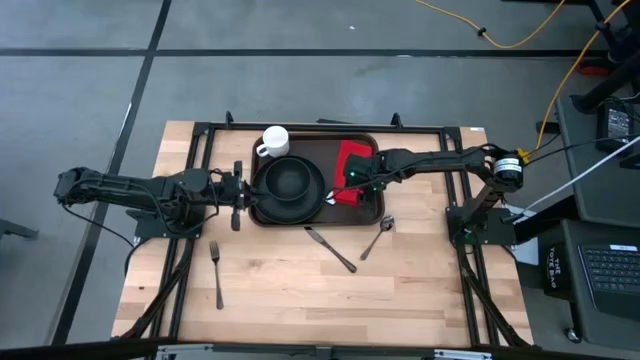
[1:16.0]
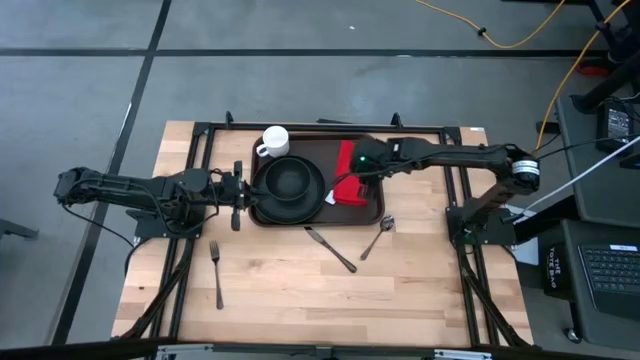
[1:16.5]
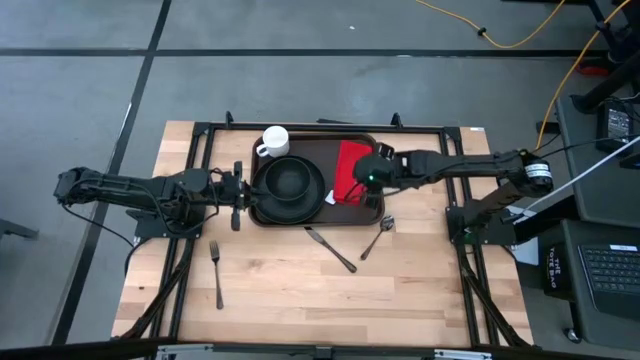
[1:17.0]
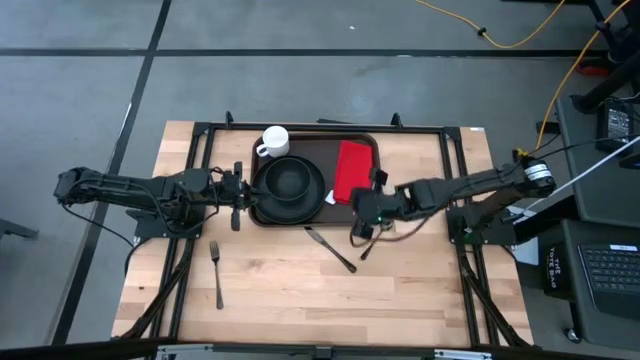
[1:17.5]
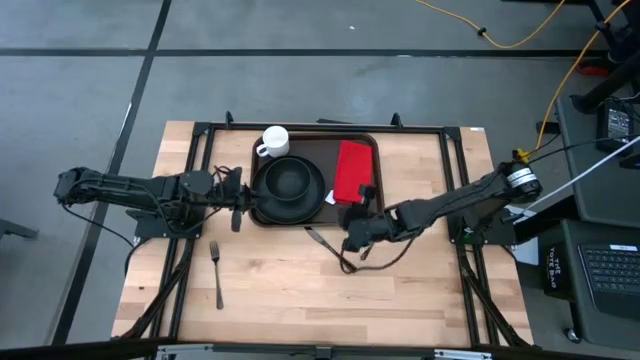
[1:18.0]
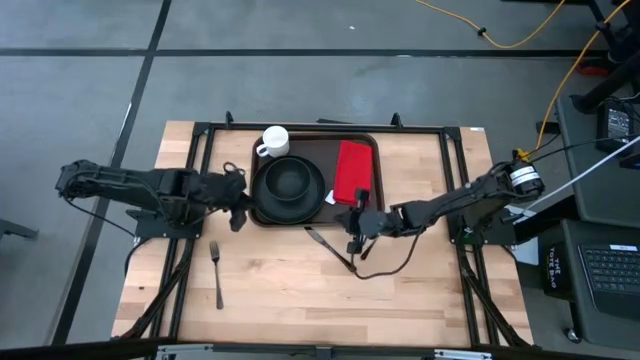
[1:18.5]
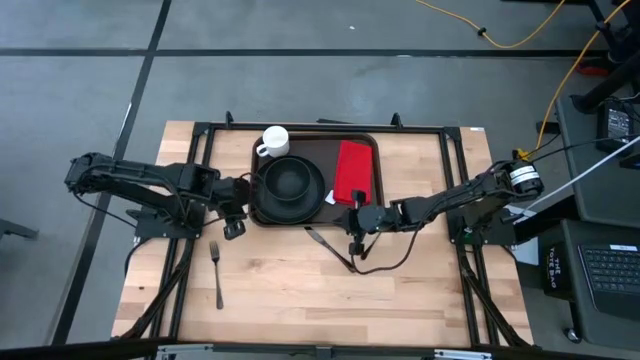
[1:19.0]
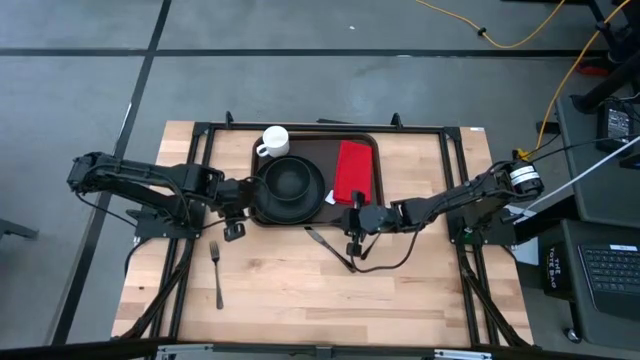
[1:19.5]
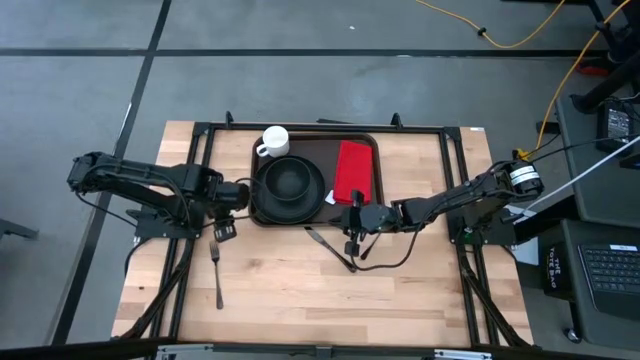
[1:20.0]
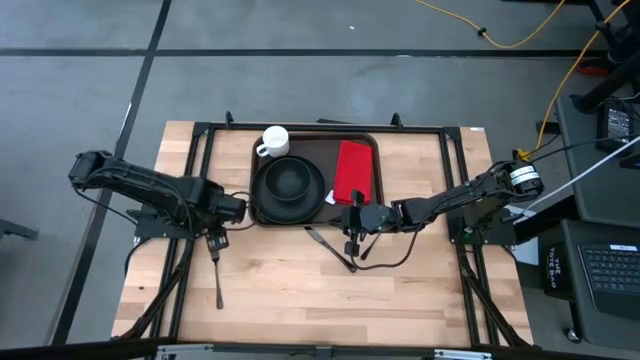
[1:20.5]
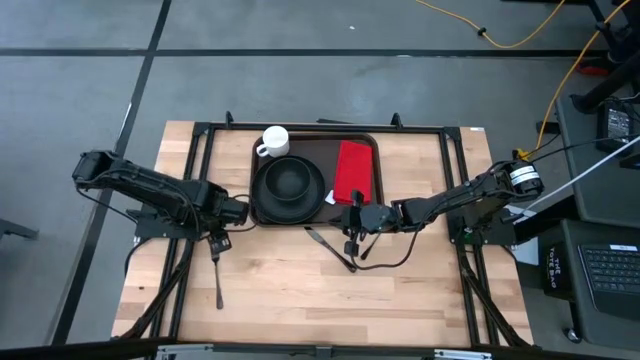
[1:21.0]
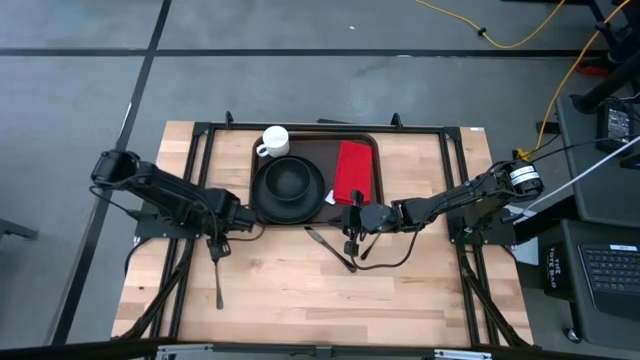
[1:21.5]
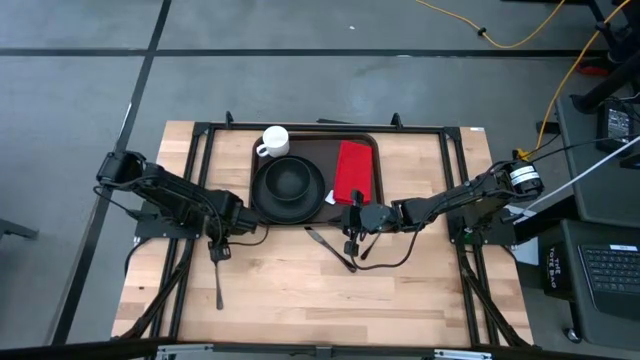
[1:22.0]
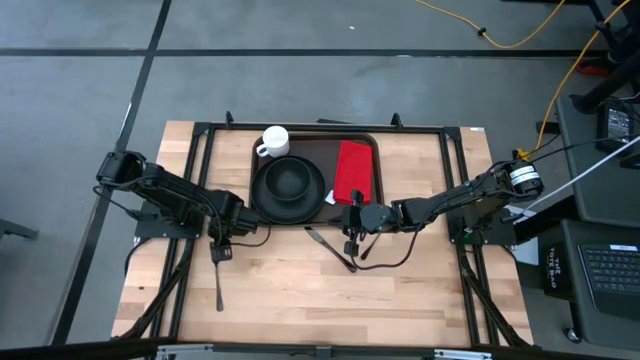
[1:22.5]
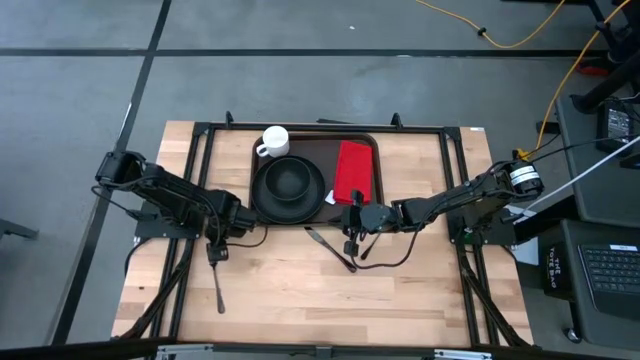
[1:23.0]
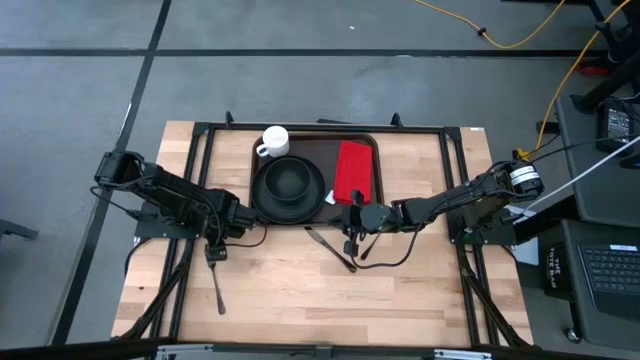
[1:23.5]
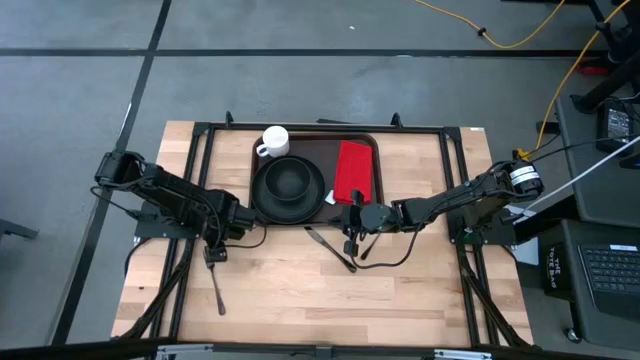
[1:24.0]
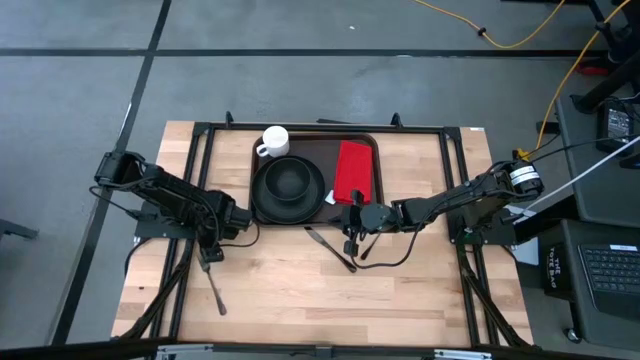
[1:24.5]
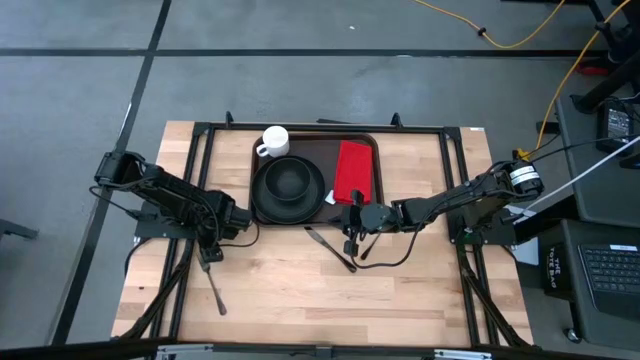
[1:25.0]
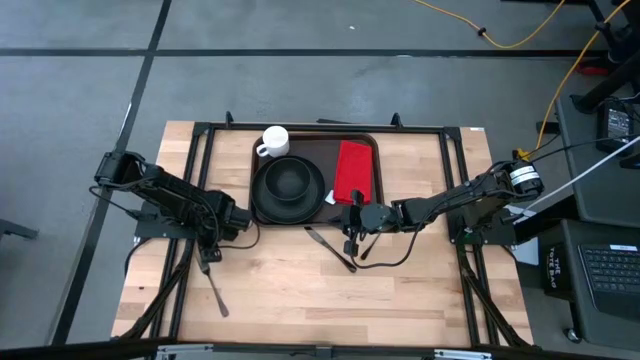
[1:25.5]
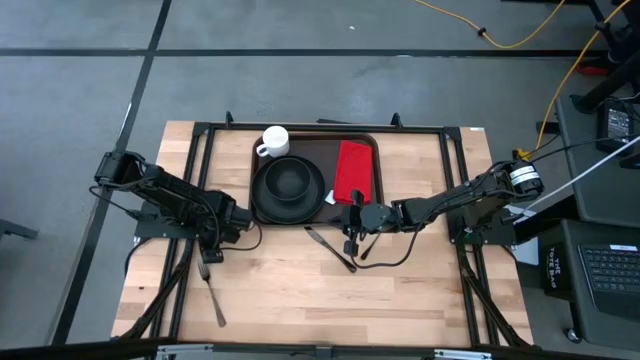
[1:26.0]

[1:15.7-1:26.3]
Task: Set up tray
Put the black fork on top of the red table napkin on the brown serving tray

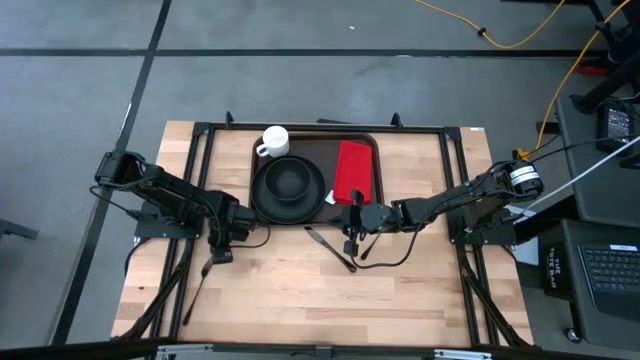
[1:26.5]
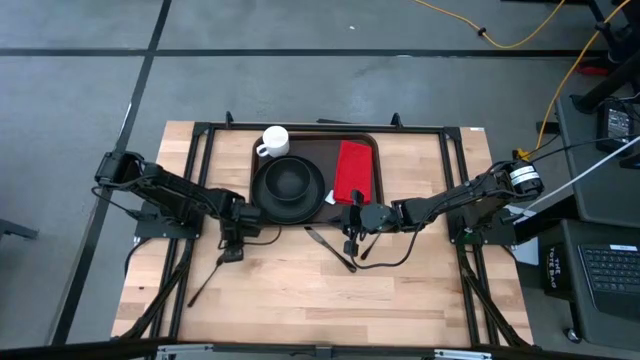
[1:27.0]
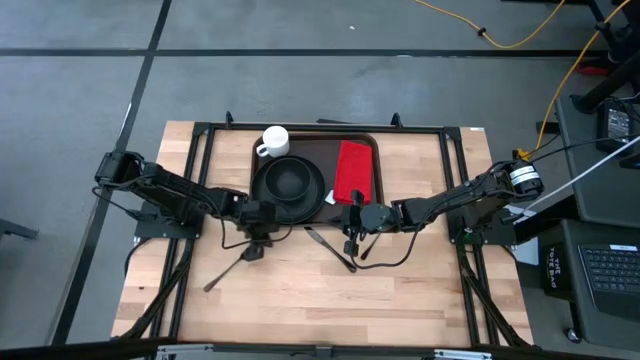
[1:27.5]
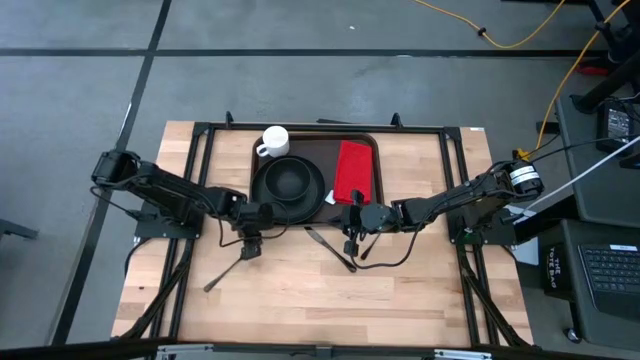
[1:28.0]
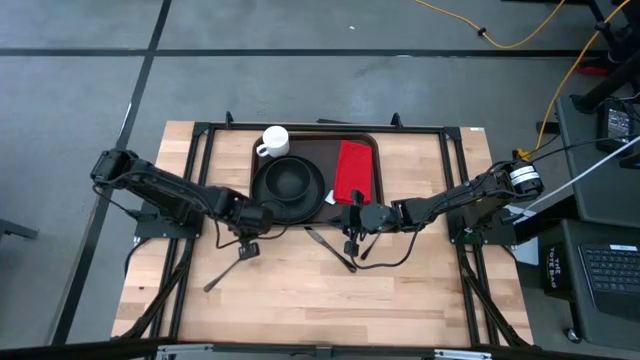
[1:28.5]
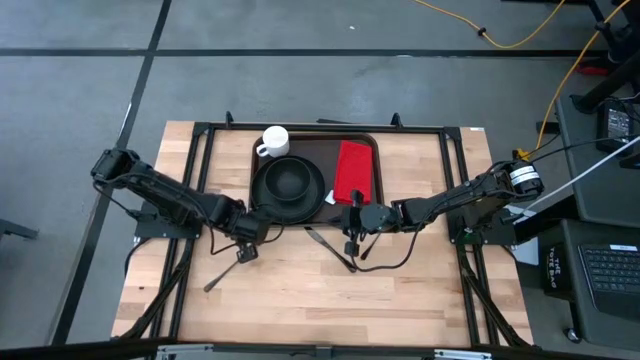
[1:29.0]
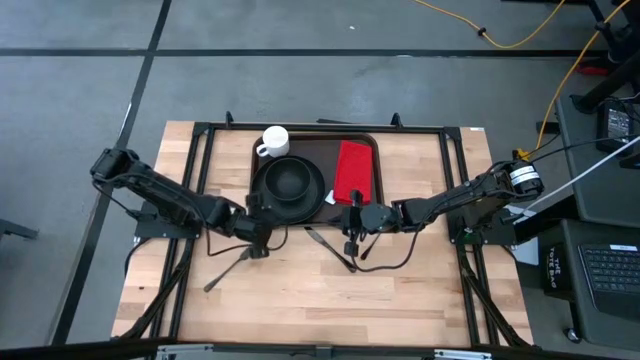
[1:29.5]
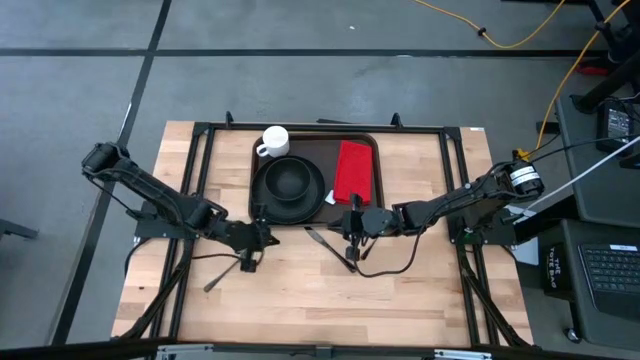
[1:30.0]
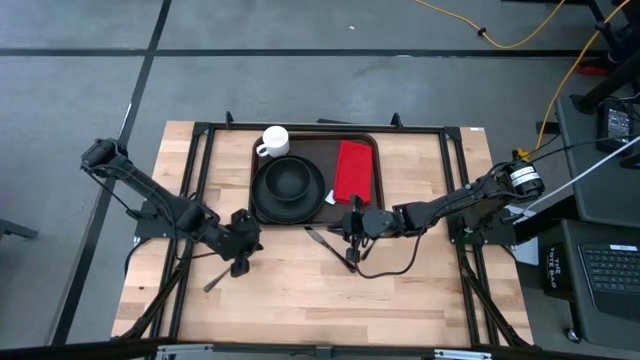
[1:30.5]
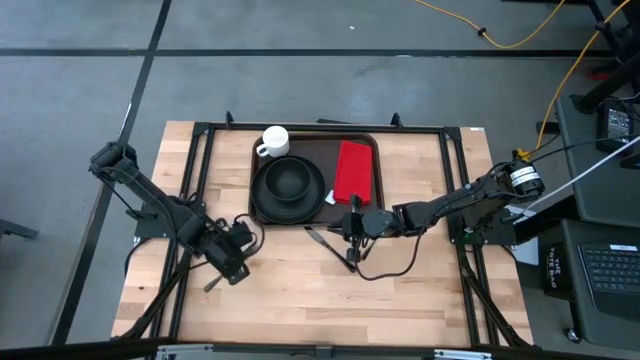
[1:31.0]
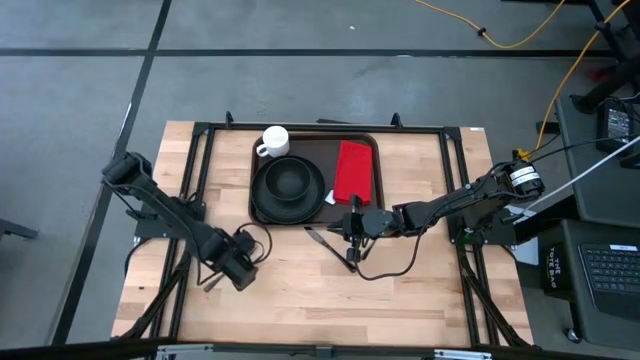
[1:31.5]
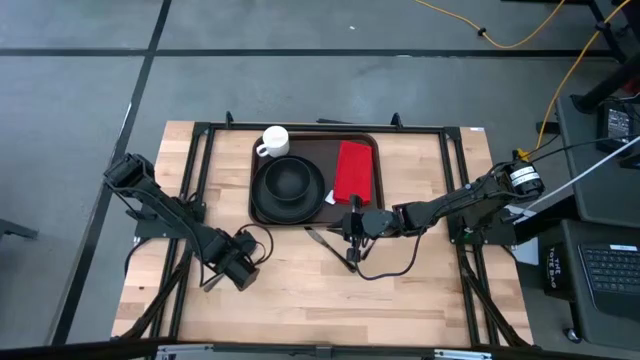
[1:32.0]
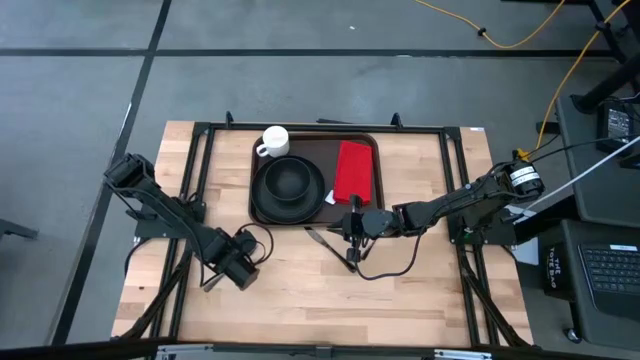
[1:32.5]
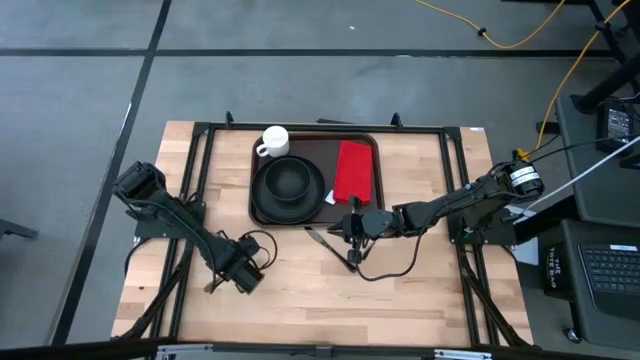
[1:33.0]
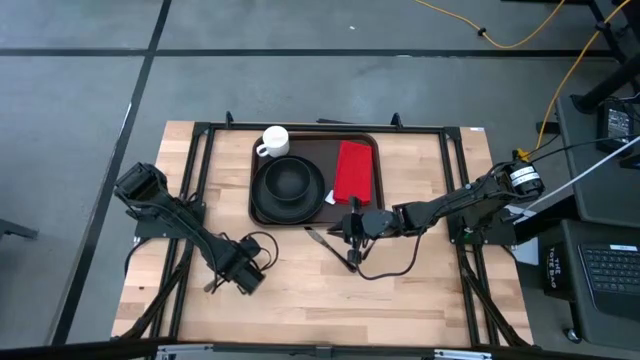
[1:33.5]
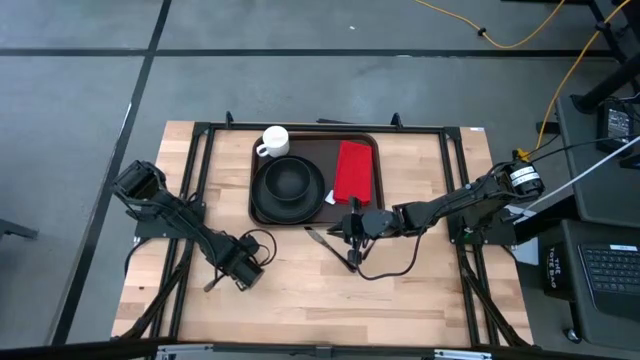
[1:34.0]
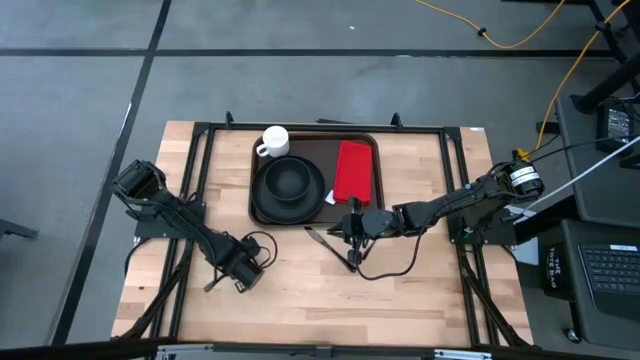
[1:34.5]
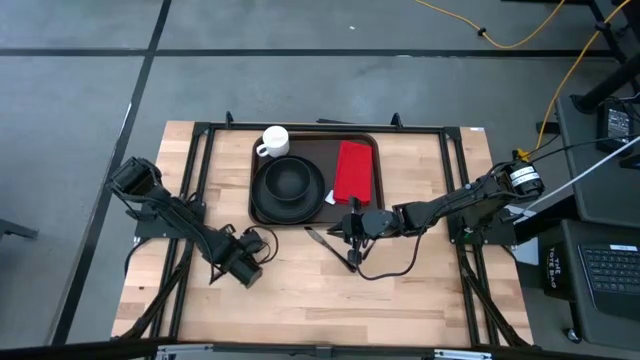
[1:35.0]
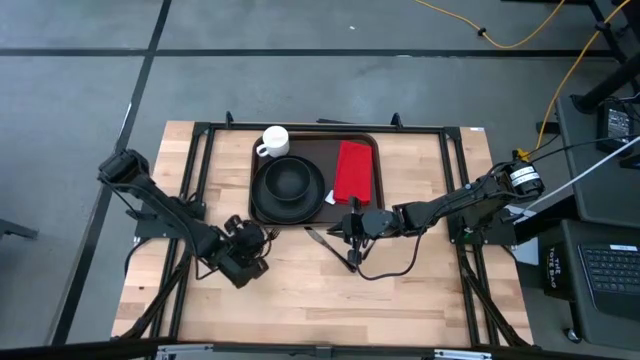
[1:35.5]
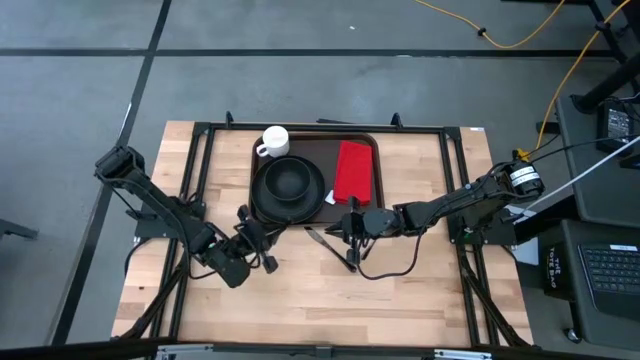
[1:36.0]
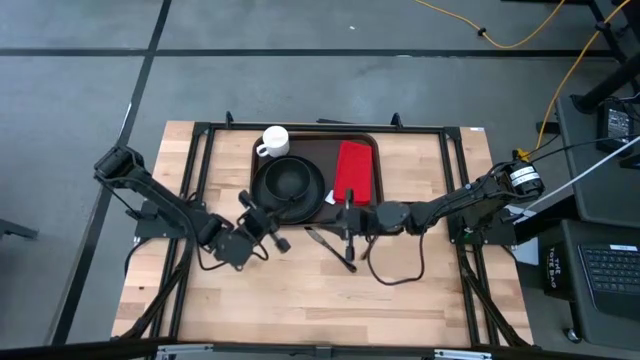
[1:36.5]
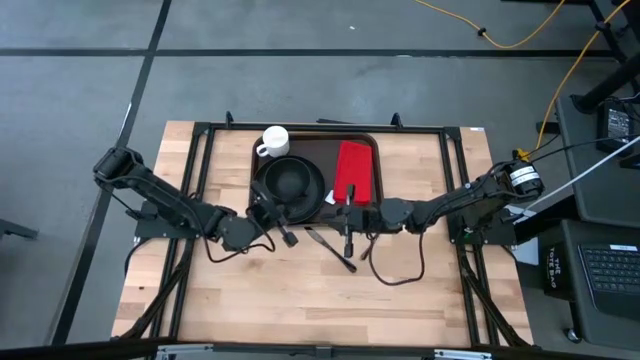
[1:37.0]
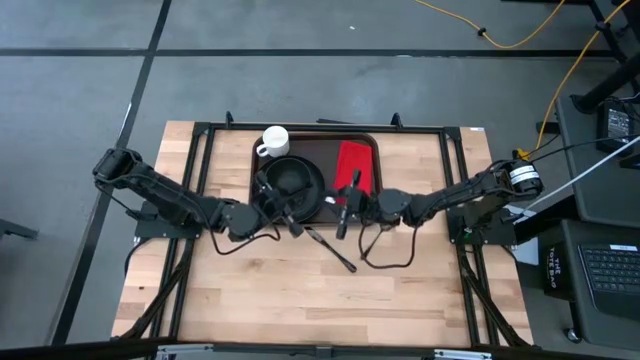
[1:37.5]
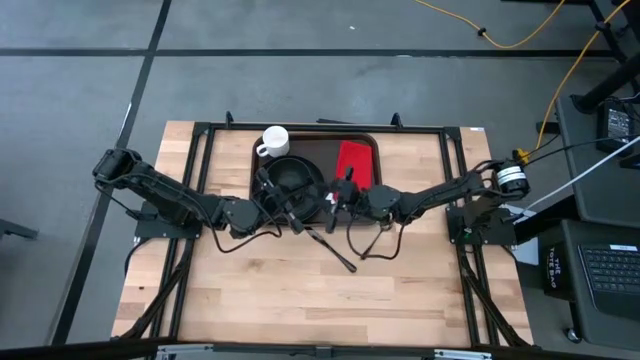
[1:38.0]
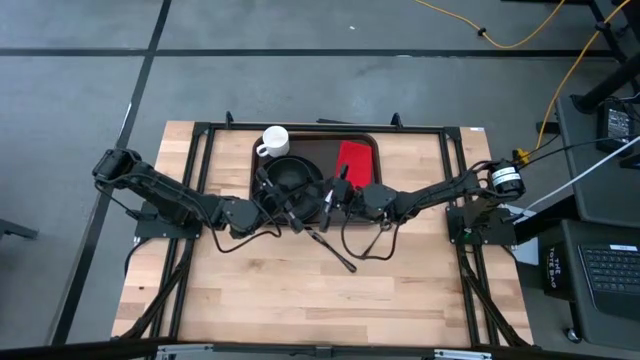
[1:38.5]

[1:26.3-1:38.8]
Put the black fork on top of the red table napkin on the brown serving tray
